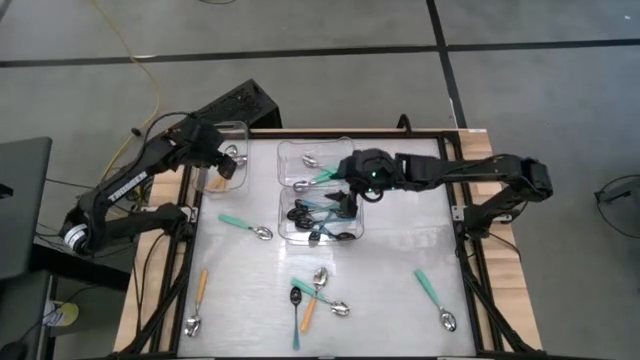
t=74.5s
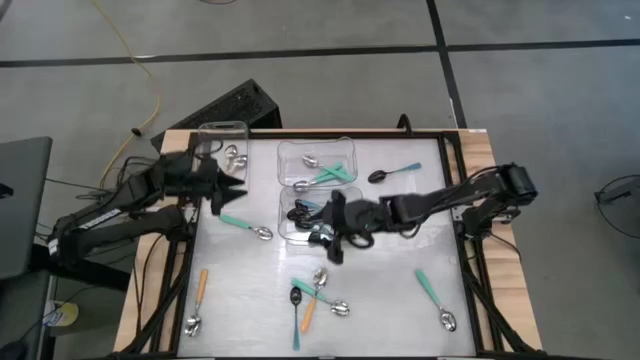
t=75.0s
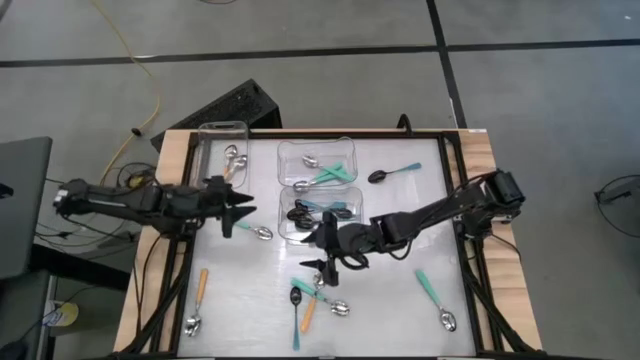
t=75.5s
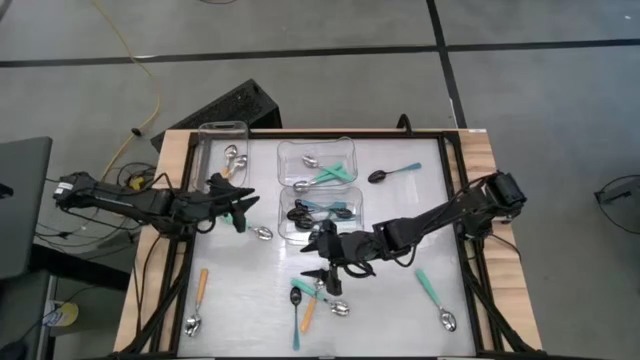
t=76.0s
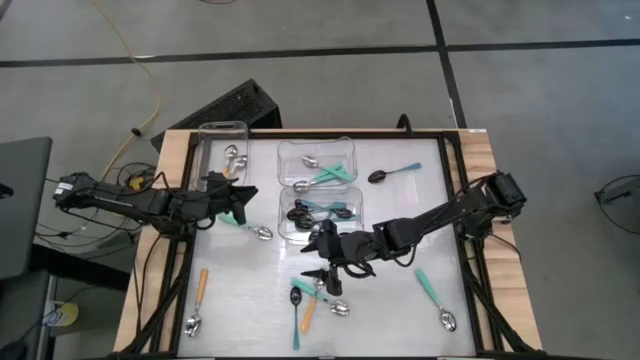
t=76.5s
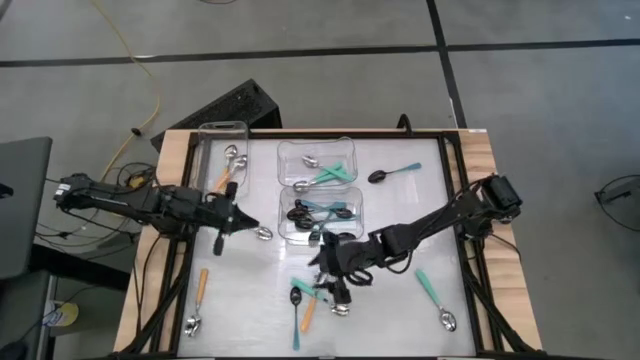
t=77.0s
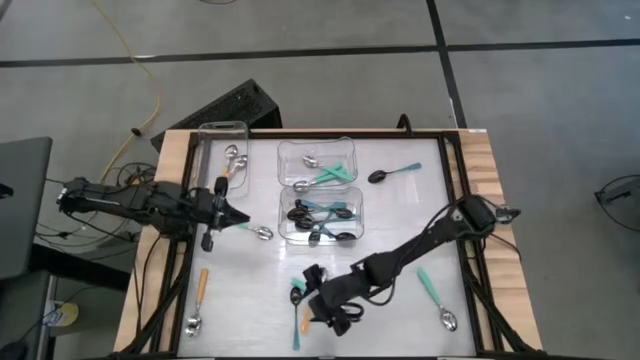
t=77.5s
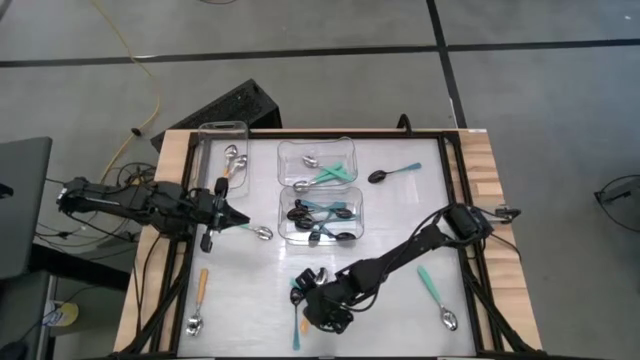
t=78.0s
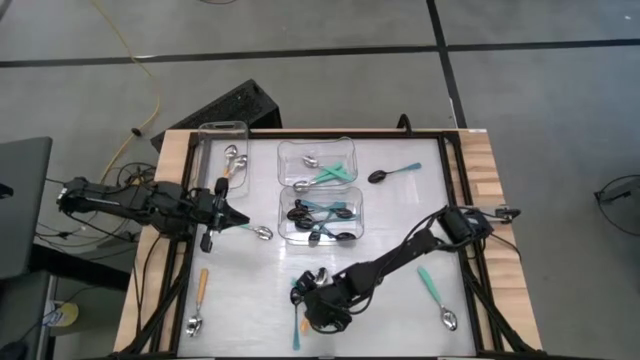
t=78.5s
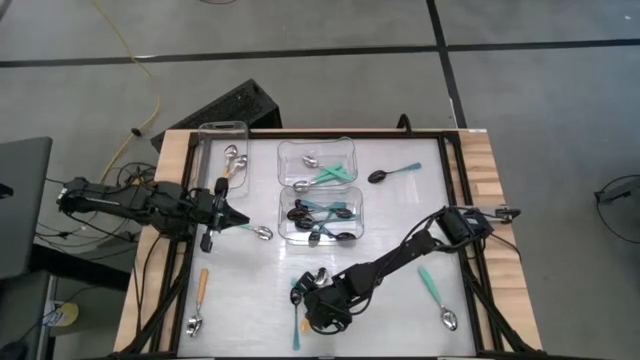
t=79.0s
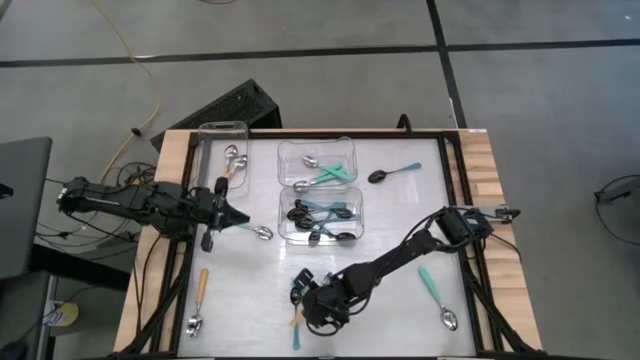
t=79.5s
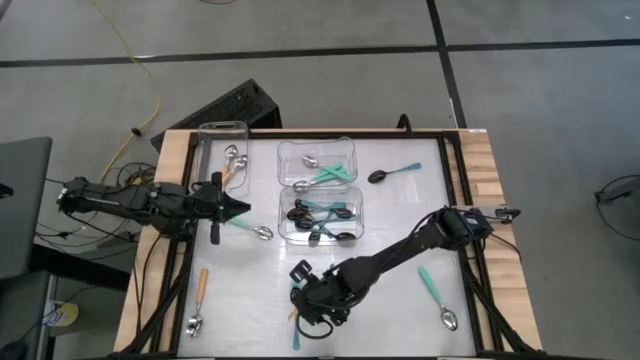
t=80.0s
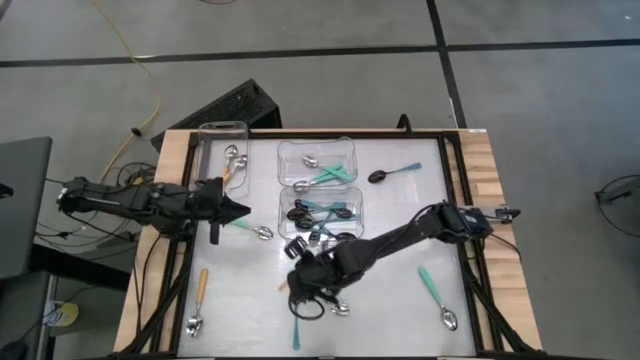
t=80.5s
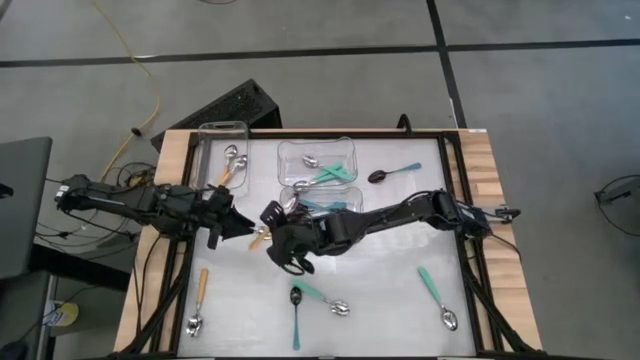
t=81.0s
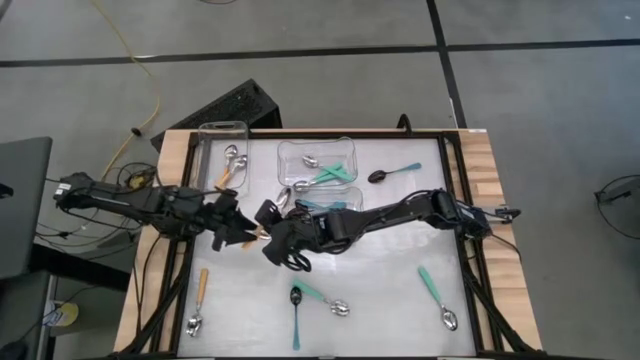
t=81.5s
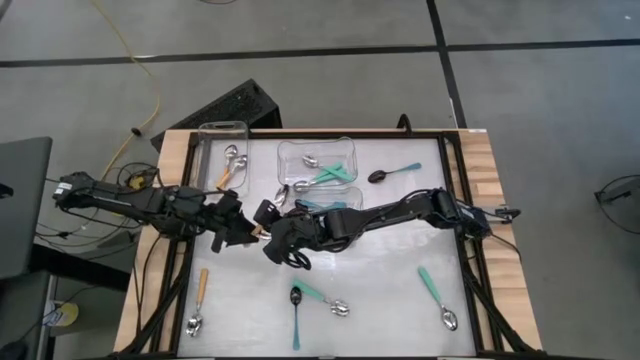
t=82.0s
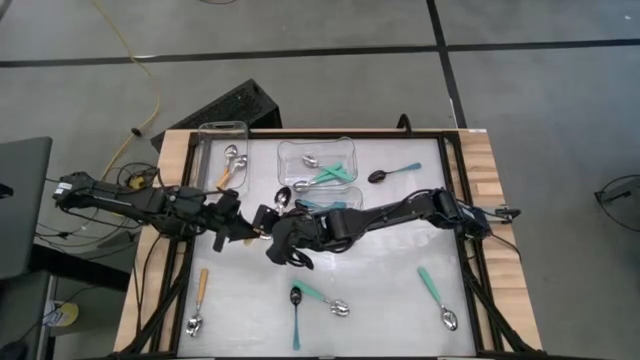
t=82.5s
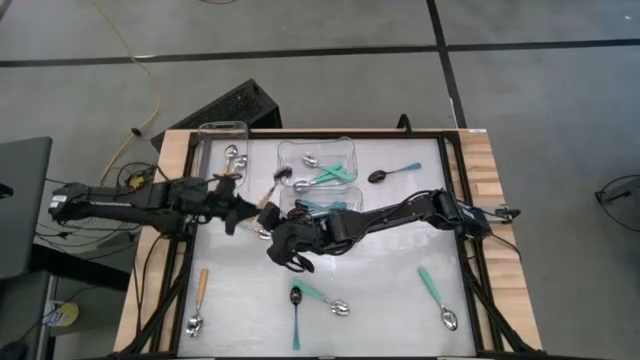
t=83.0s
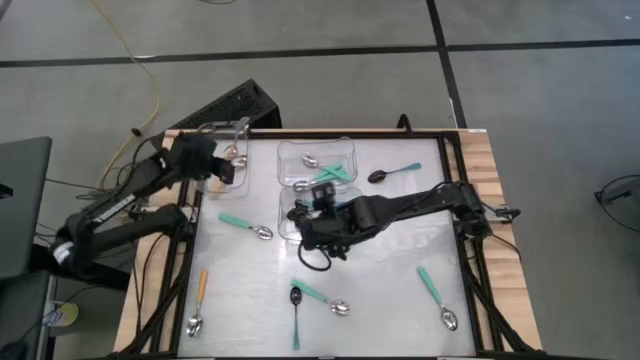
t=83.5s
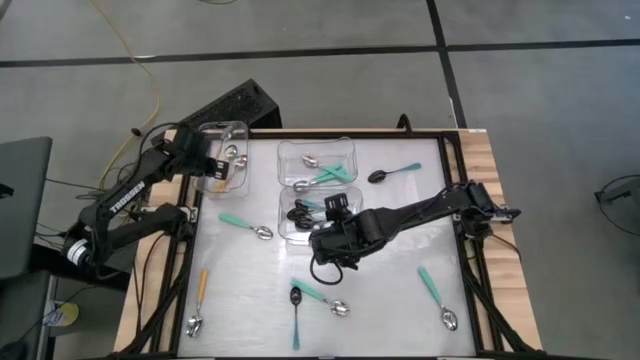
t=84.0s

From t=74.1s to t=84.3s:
Task: Sort silverware by color (type)
Put the yellow spoon into the top left transparent bin

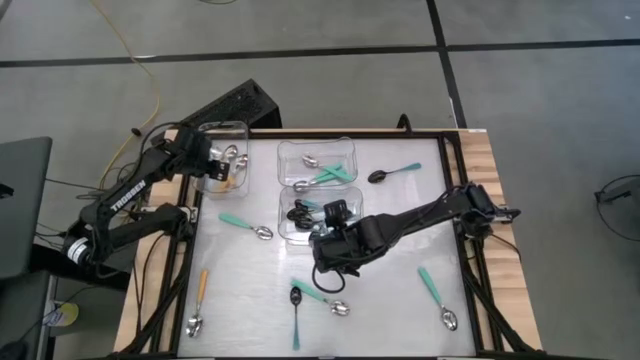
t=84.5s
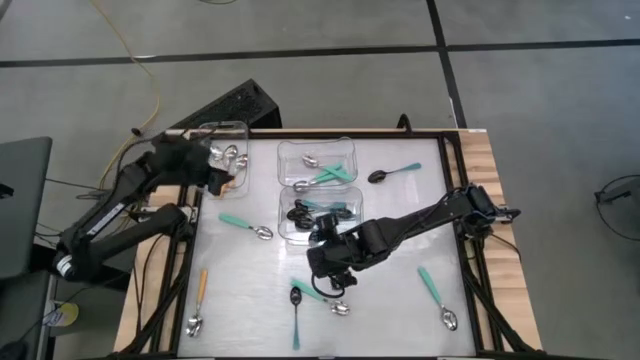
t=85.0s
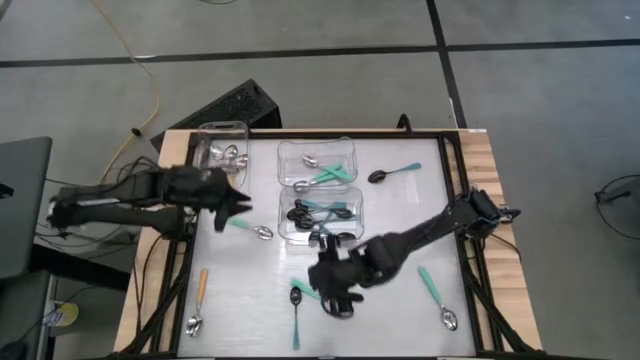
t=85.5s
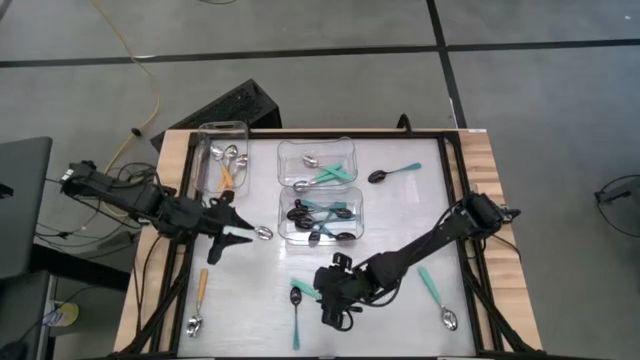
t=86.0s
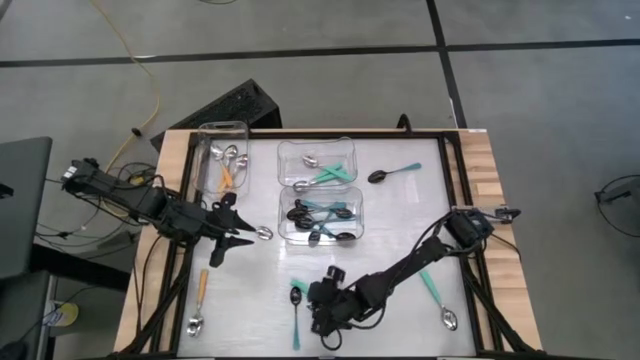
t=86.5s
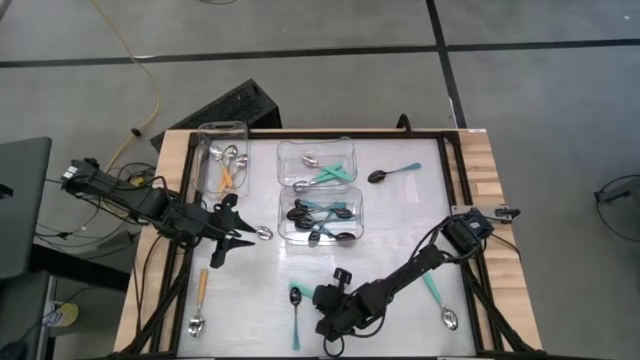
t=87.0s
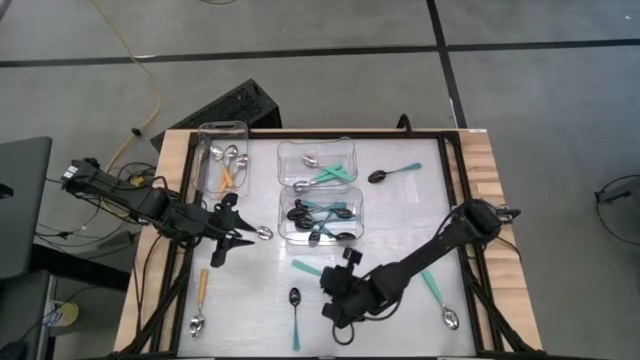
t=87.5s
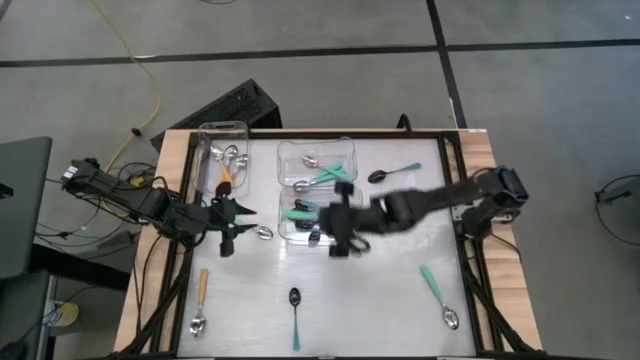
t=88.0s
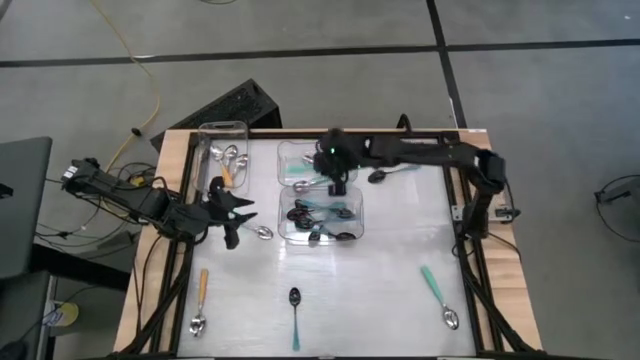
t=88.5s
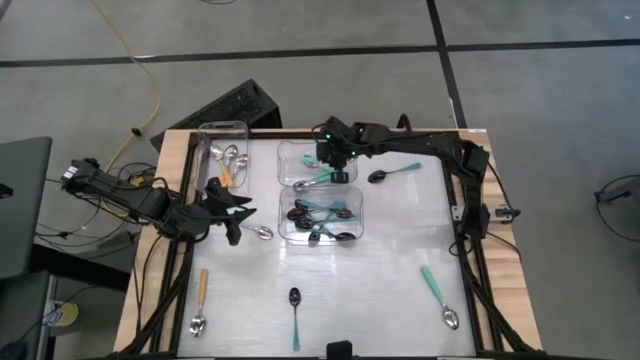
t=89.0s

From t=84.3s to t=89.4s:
Put the green spoon into the top right transparent bin

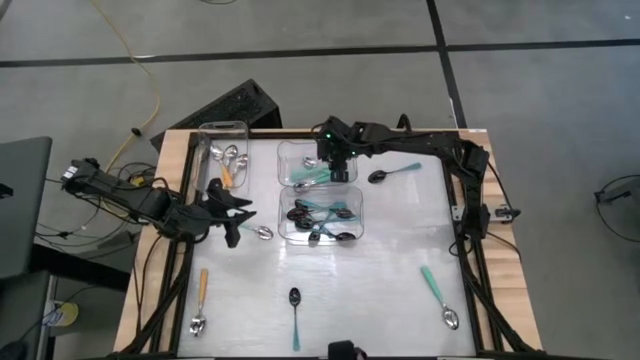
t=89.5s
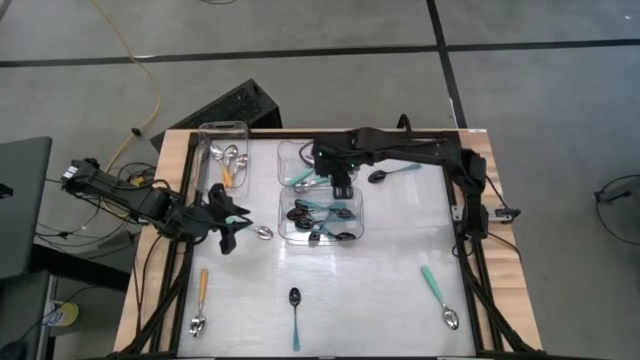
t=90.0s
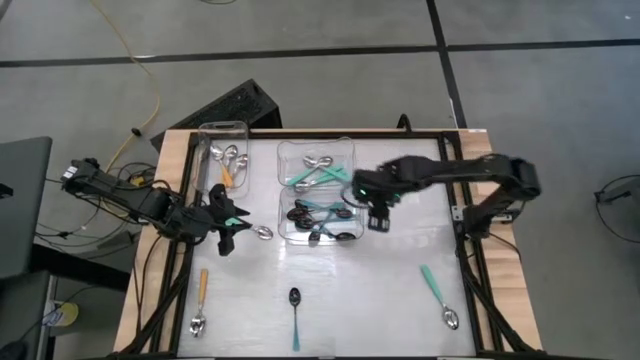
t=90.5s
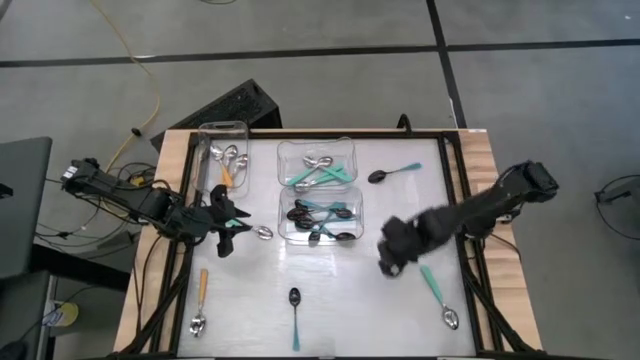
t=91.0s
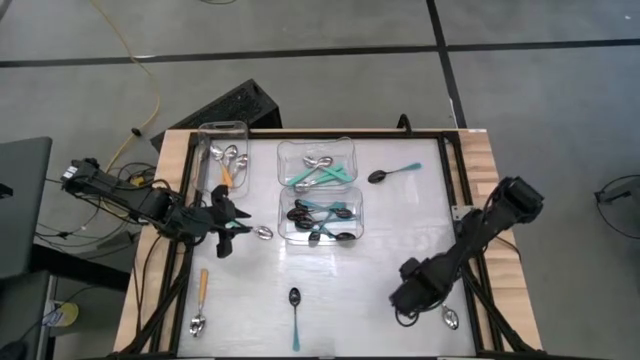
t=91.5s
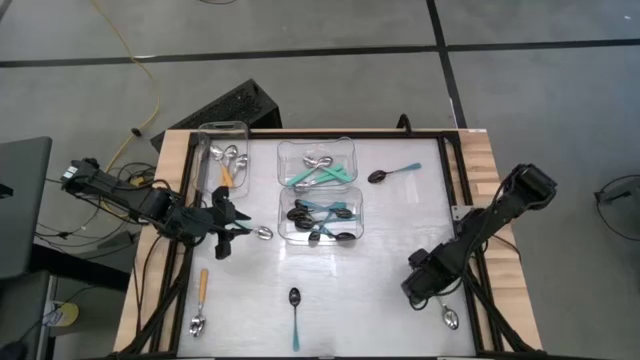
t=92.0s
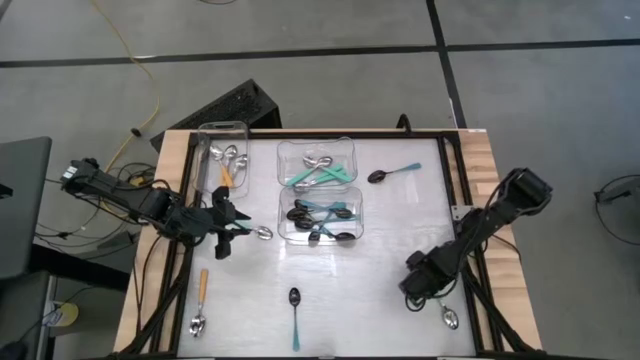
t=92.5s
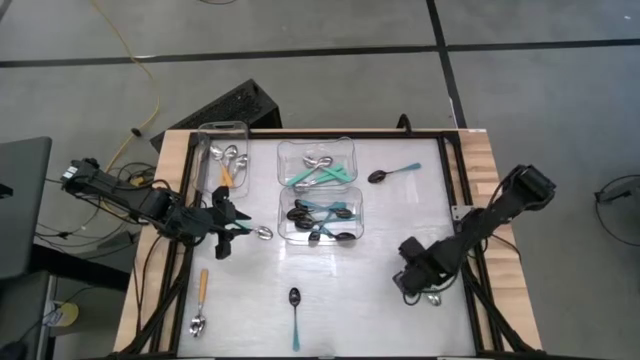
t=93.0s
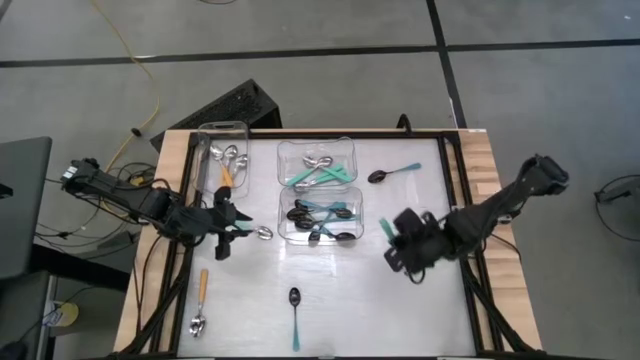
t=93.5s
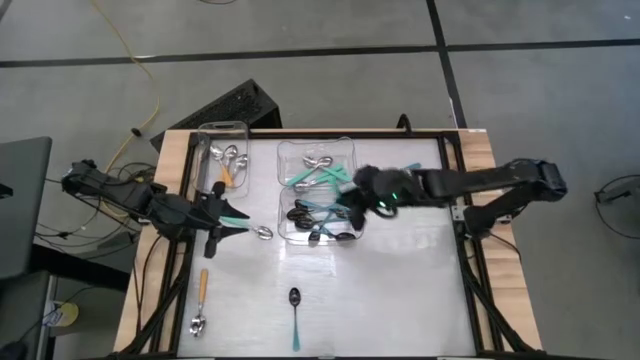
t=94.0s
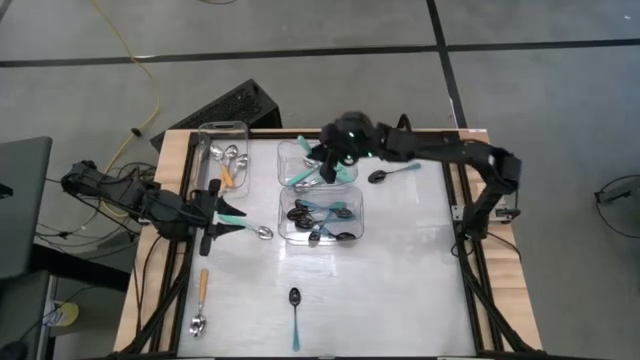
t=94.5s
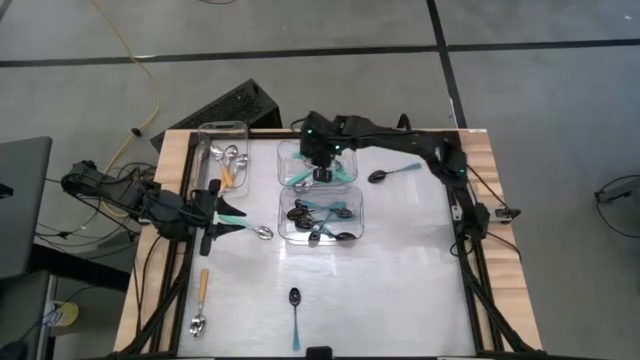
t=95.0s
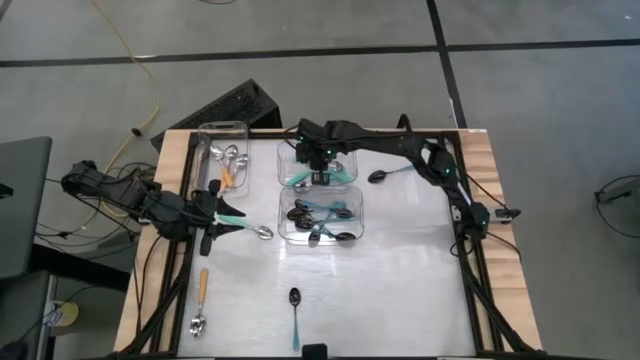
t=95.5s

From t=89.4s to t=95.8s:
Put the green spoon into the top right transparent bin
